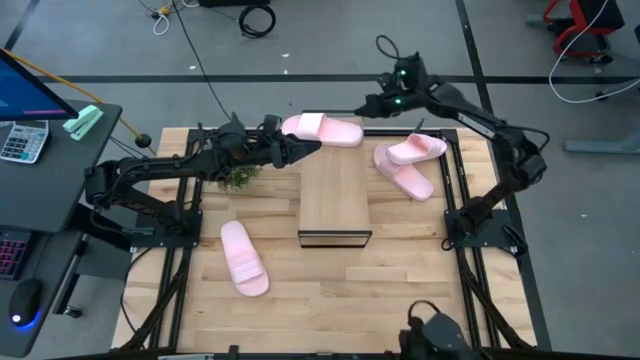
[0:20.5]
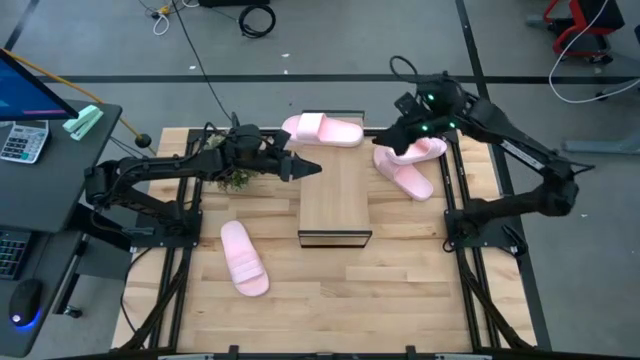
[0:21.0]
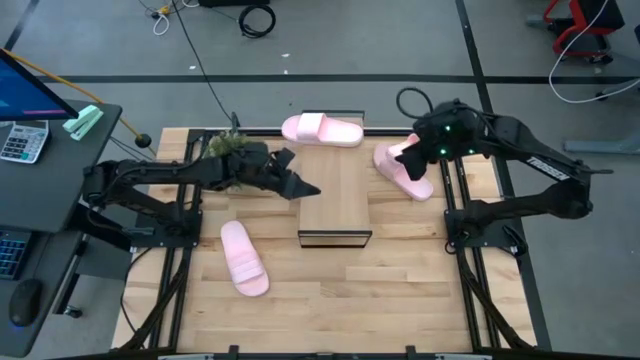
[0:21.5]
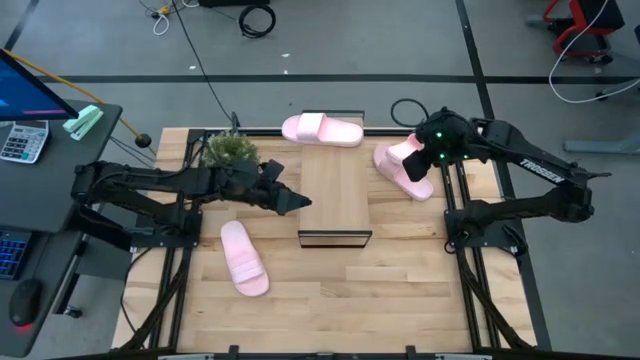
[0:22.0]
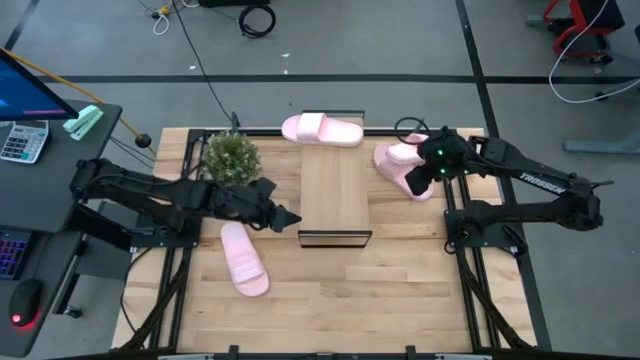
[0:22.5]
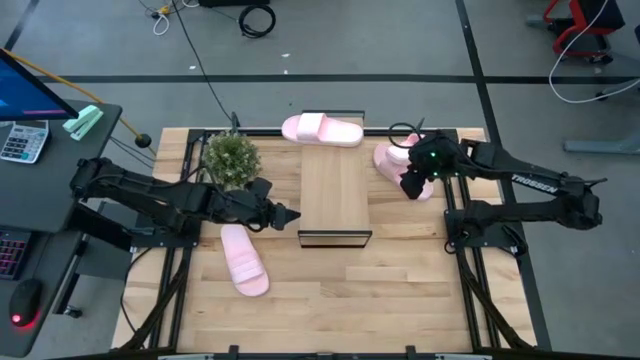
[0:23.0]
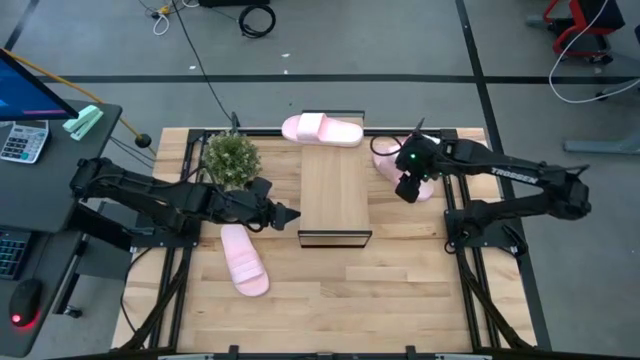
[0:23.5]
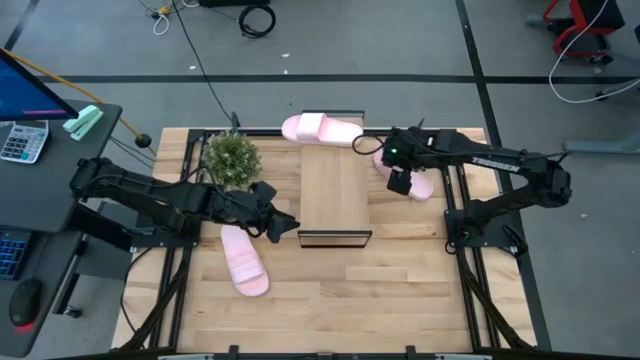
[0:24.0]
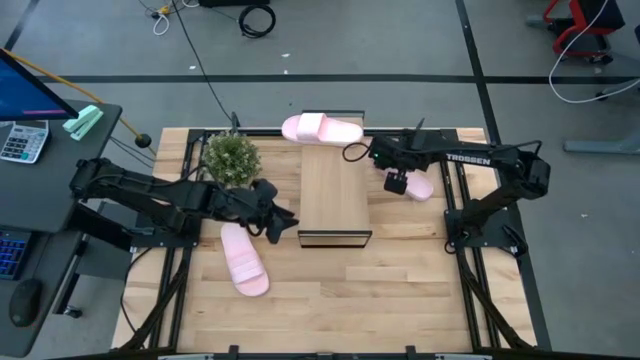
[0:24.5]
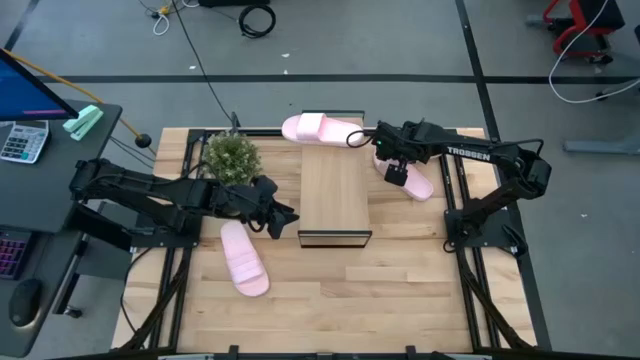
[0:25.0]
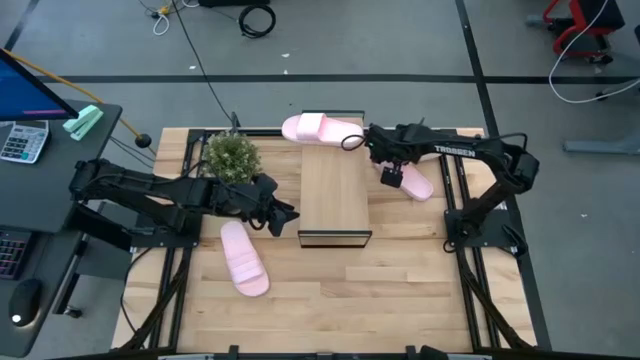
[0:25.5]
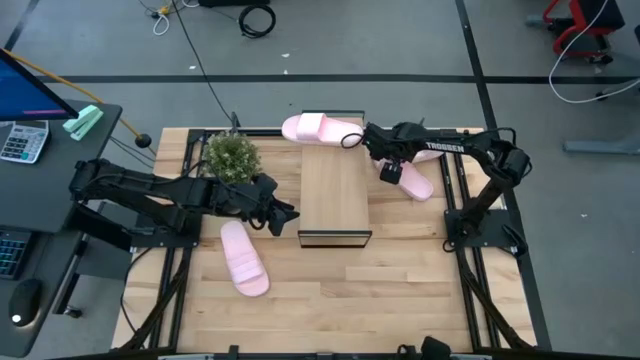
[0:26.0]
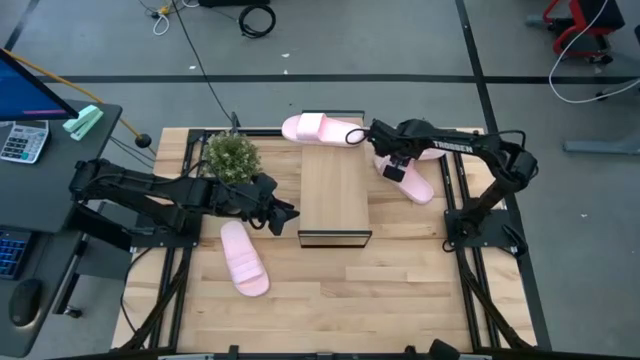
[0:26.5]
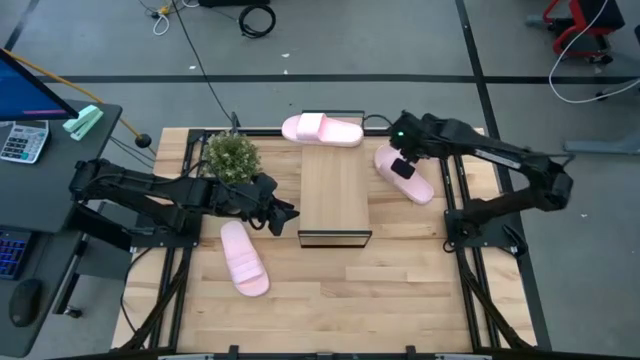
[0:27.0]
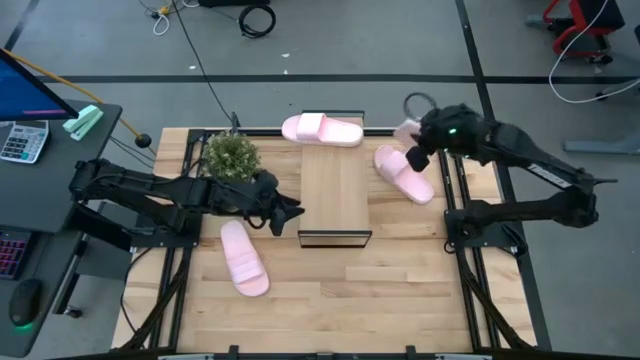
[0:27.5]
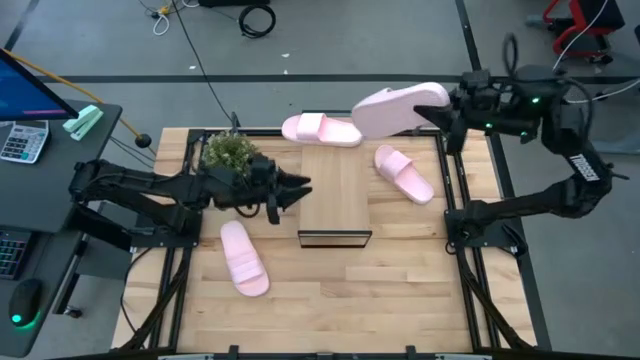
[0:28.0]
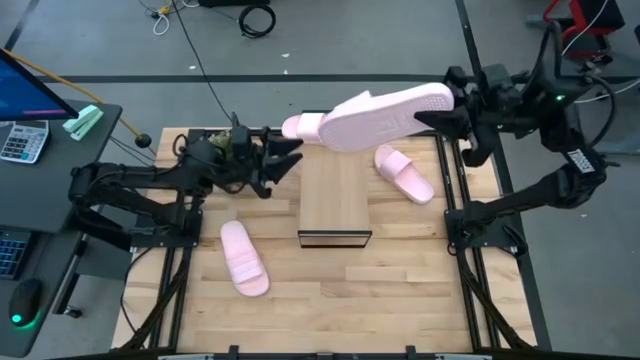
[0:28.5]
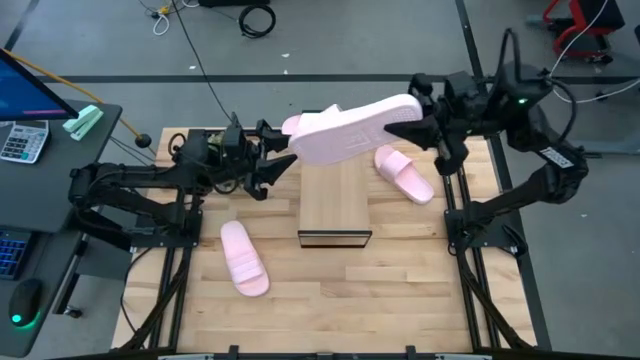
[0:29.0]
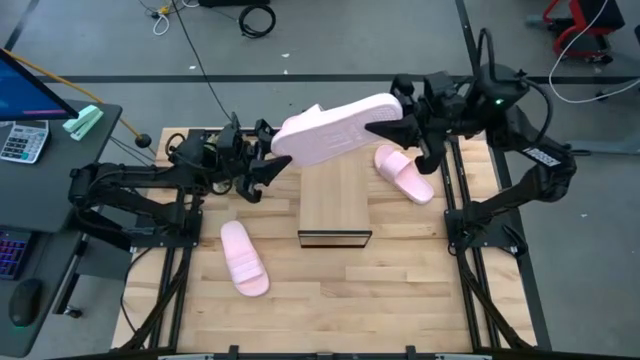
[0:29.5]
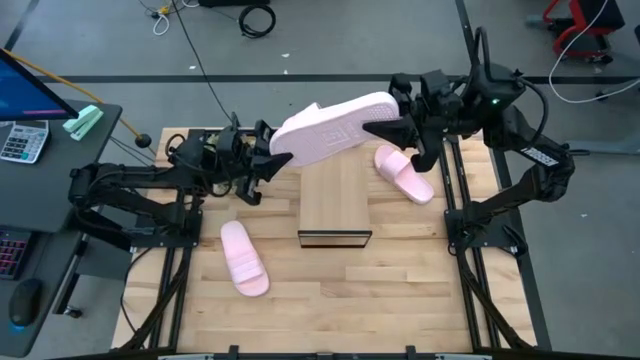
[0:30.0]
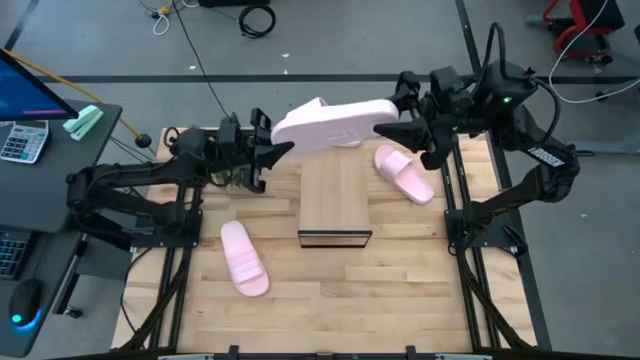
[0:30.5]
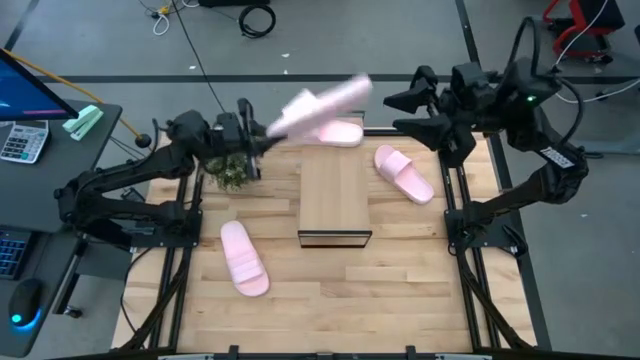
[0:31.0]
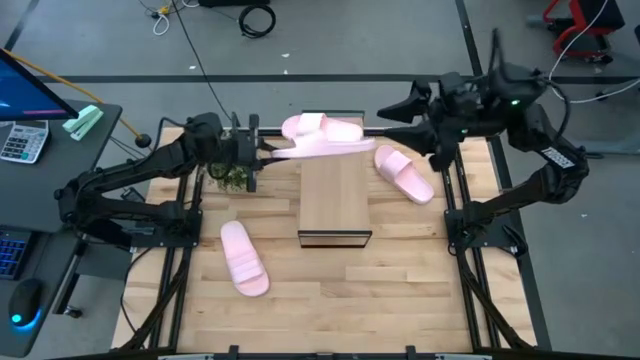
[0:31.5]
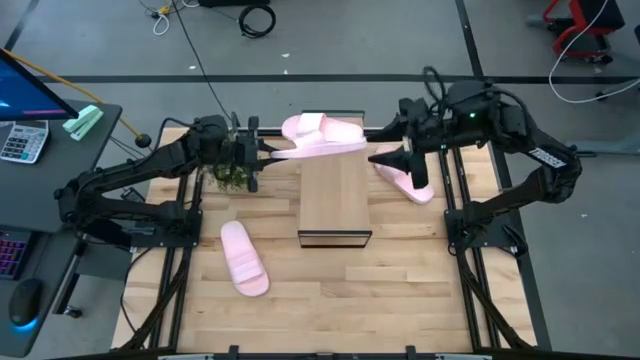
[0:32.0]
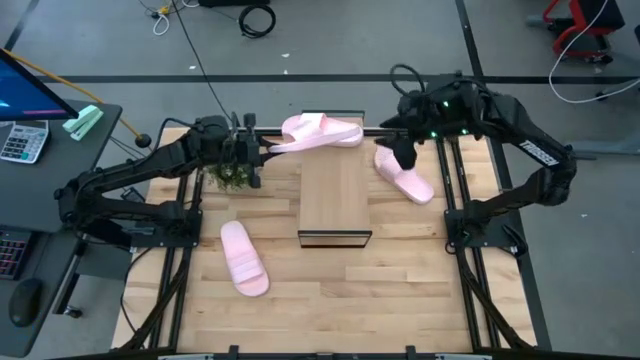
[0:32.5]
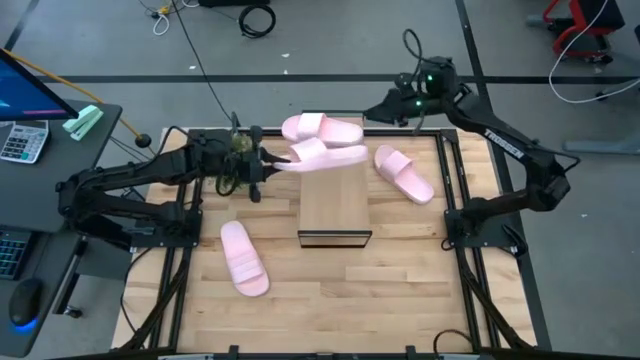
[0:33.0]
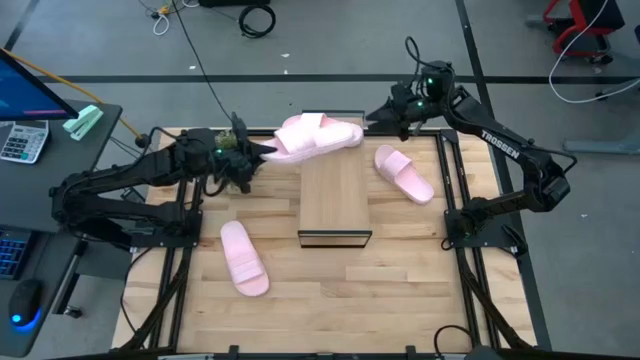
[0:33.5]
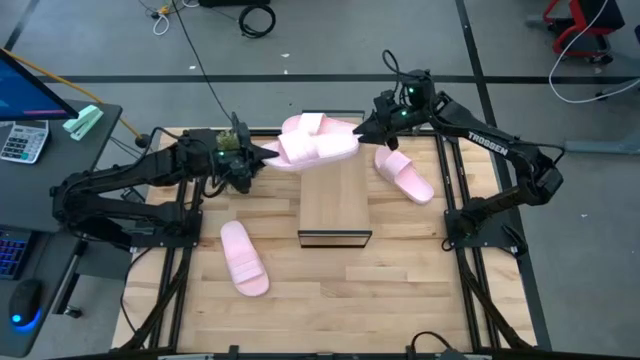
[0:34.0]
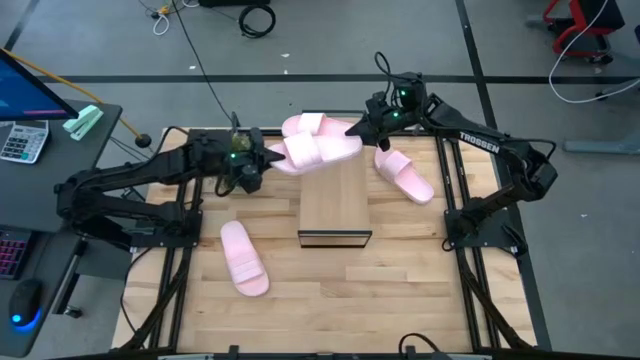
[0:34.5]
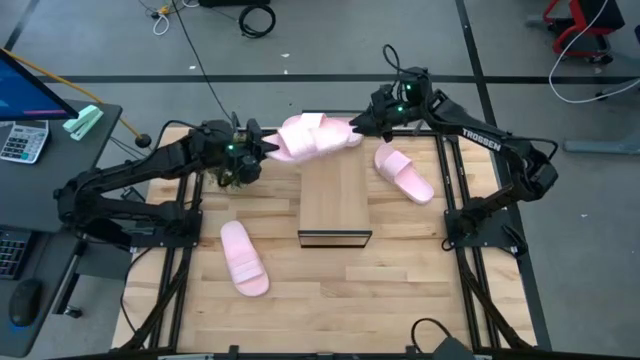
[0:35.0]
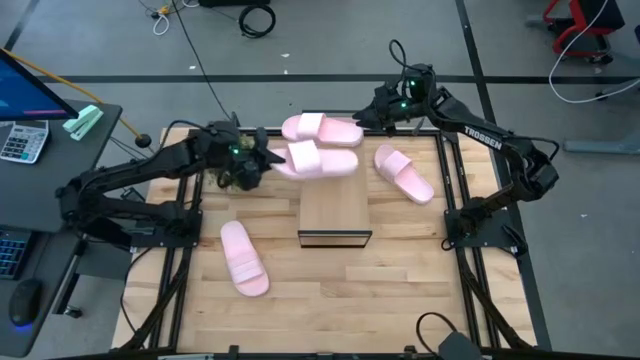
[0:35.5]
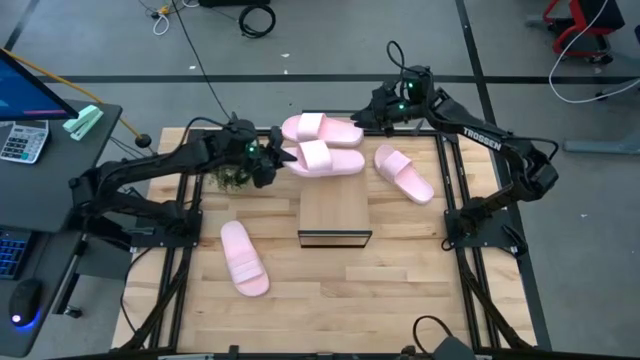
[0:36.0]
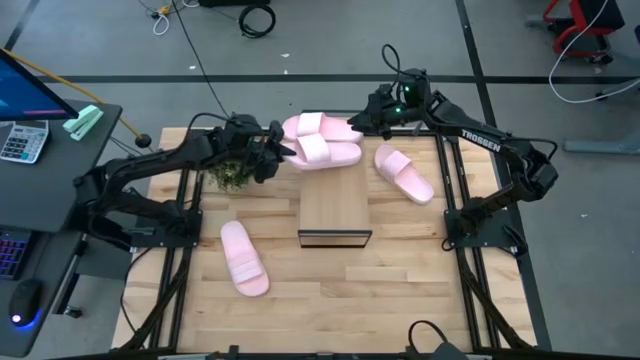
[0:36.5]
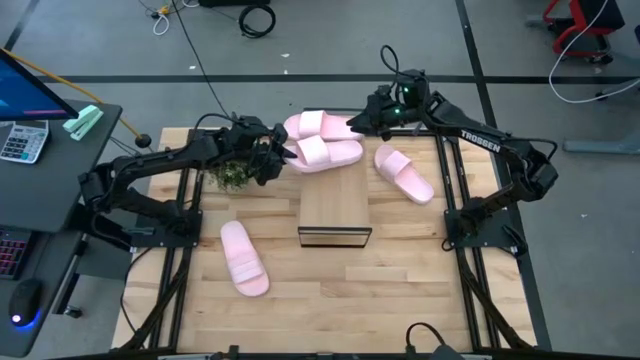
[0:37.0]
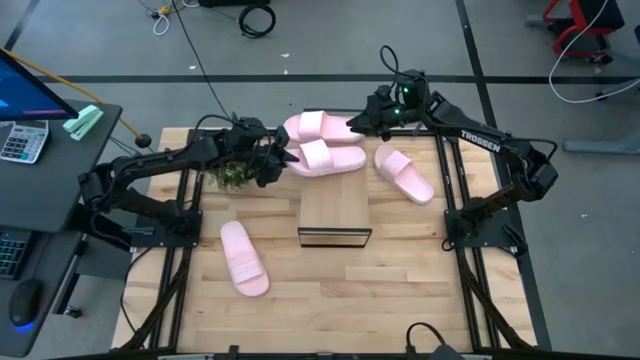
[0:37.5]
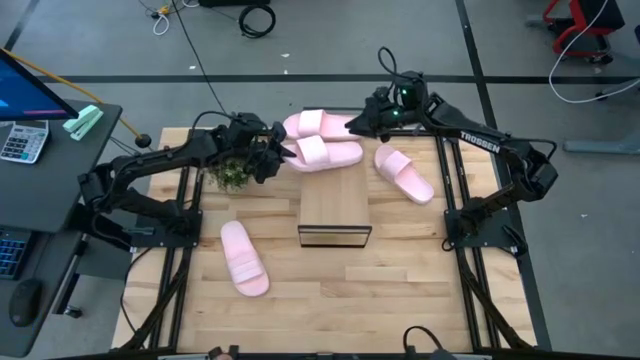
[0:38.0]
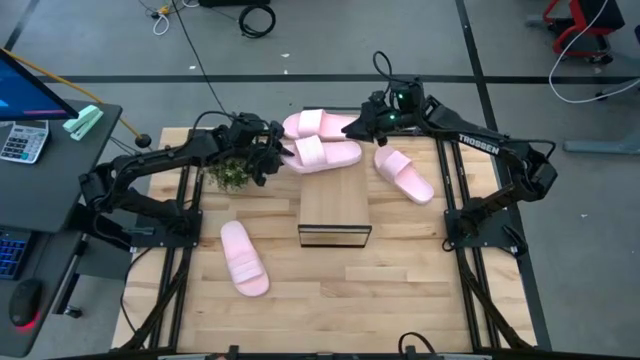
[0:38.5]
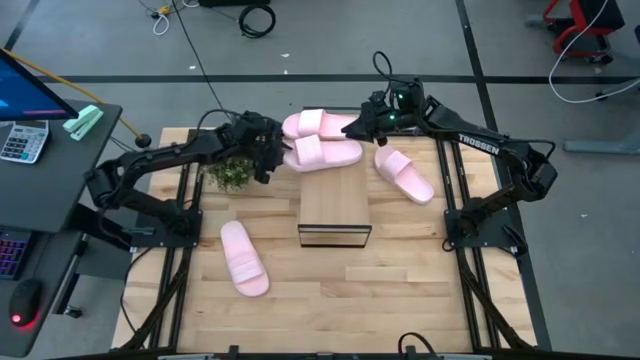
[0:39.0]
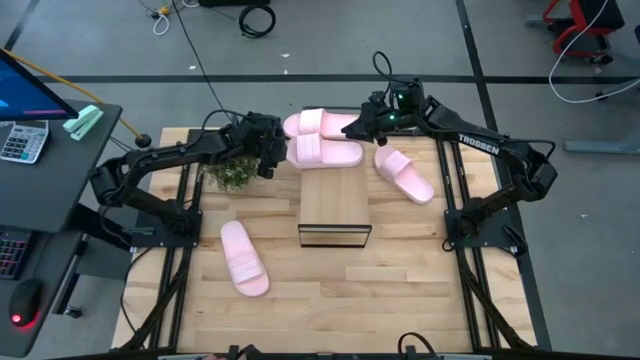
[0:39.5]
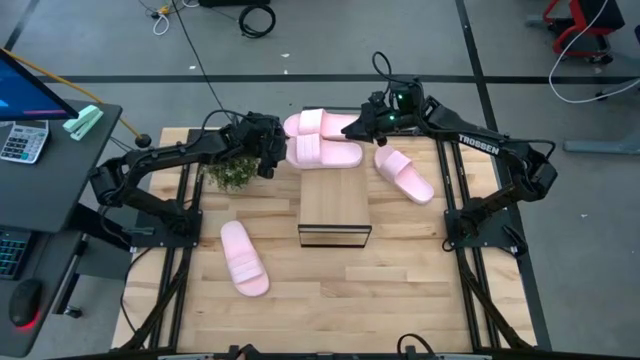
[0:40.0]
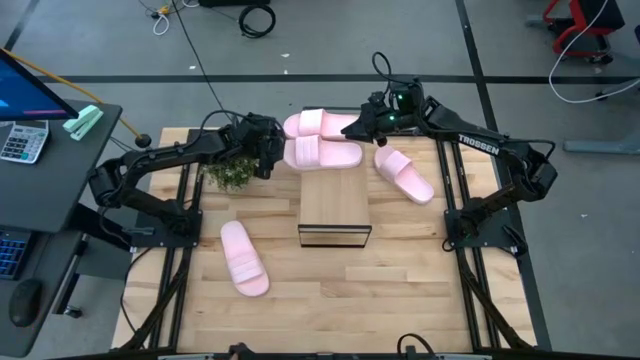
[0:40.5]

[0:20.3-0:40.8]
Task: Pick and place slides into the shelf
Put the pink slide on the shelf
